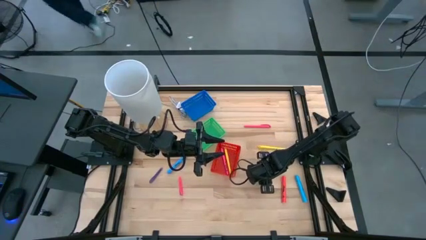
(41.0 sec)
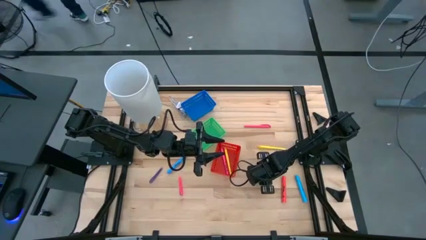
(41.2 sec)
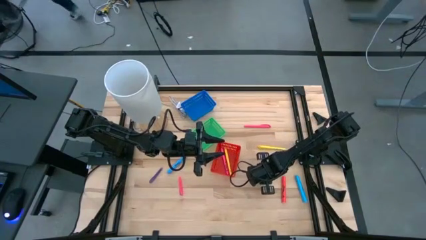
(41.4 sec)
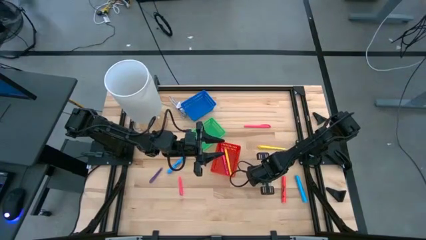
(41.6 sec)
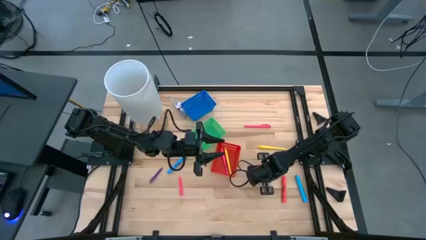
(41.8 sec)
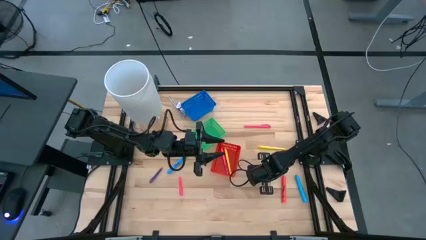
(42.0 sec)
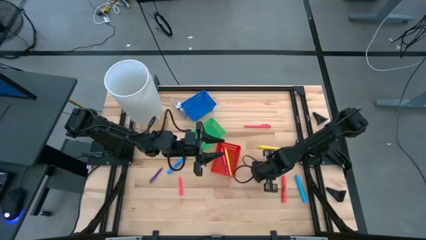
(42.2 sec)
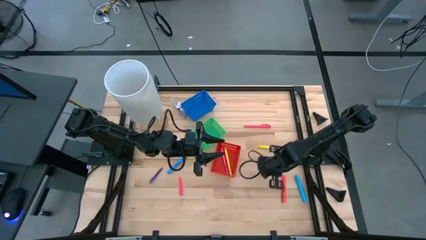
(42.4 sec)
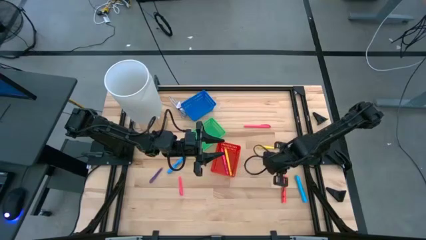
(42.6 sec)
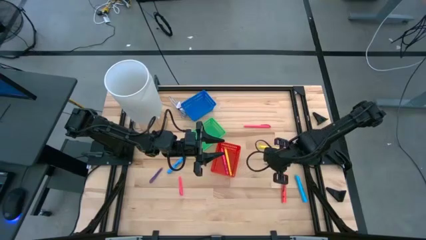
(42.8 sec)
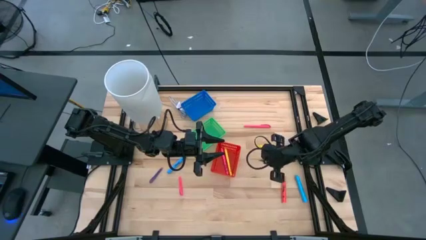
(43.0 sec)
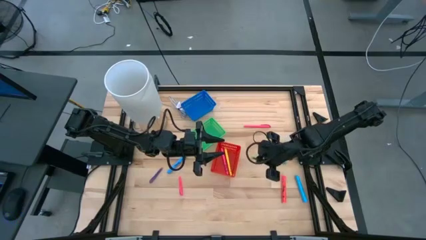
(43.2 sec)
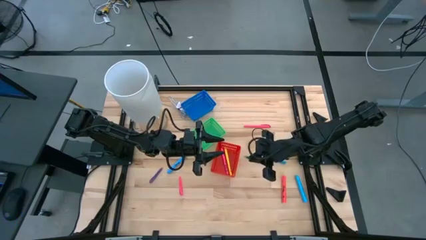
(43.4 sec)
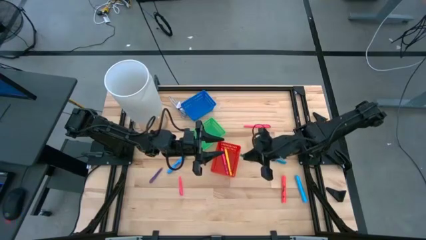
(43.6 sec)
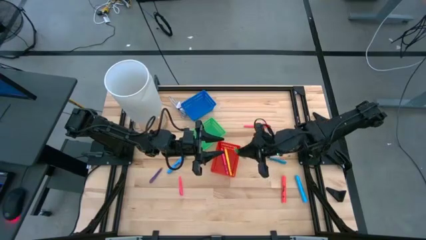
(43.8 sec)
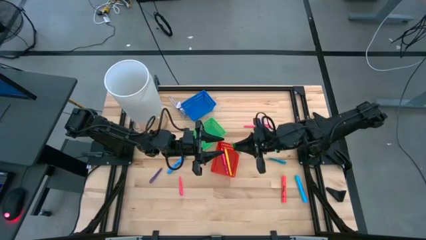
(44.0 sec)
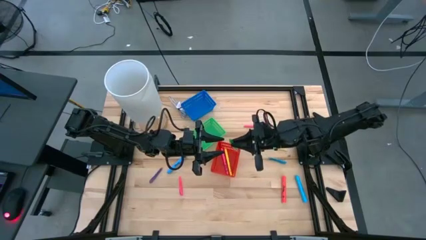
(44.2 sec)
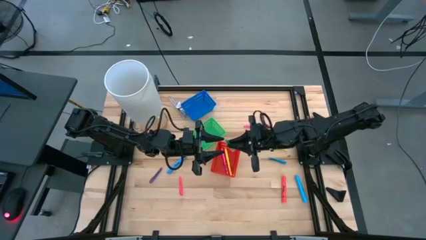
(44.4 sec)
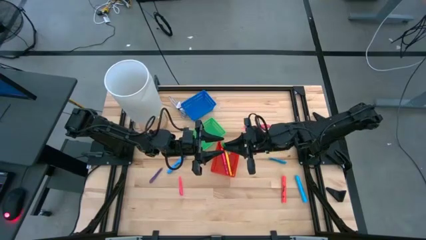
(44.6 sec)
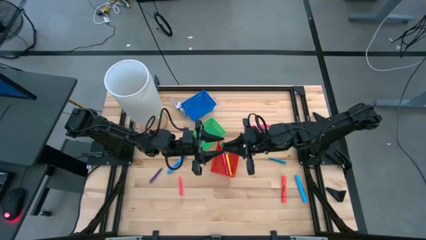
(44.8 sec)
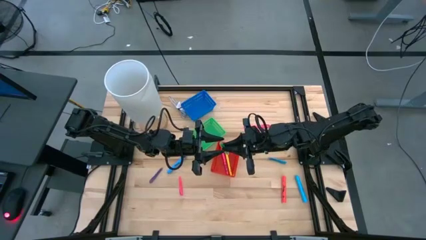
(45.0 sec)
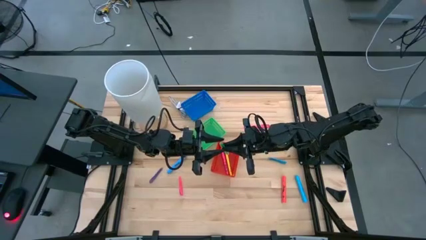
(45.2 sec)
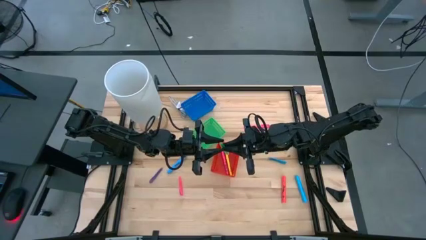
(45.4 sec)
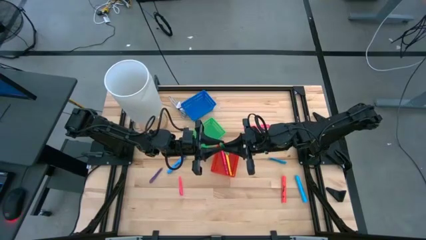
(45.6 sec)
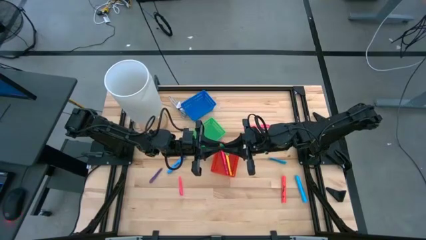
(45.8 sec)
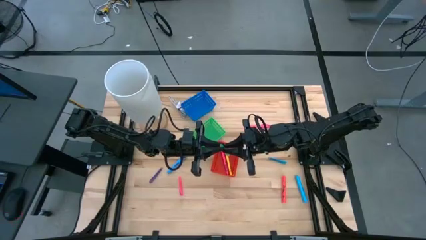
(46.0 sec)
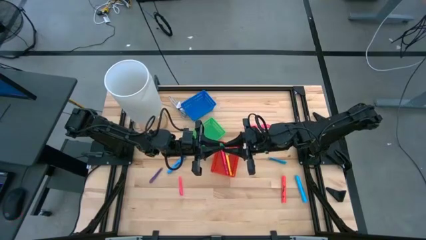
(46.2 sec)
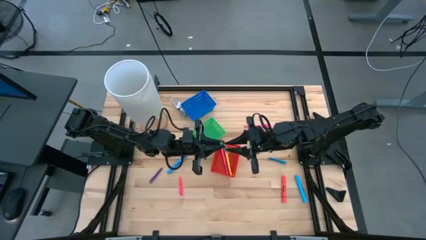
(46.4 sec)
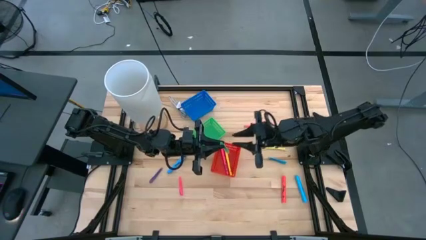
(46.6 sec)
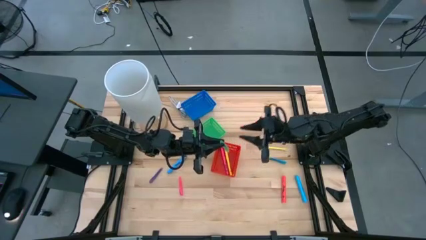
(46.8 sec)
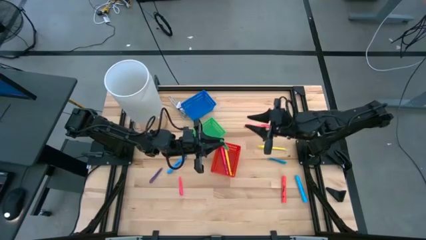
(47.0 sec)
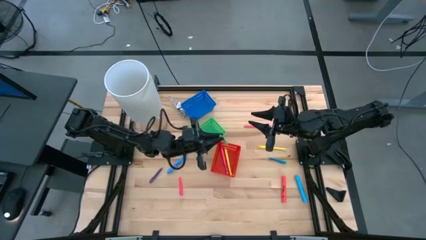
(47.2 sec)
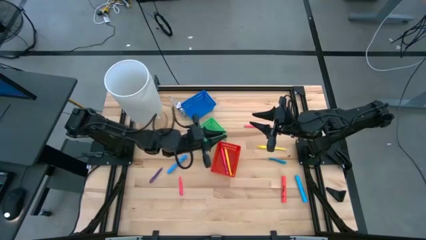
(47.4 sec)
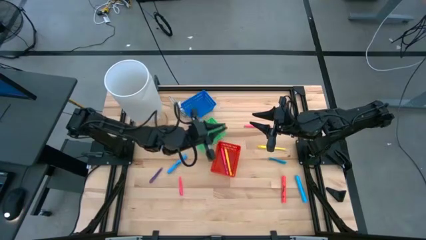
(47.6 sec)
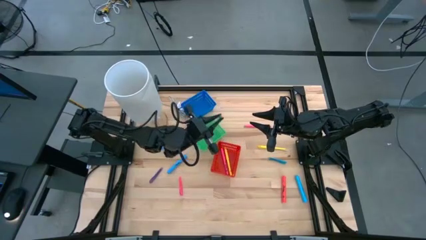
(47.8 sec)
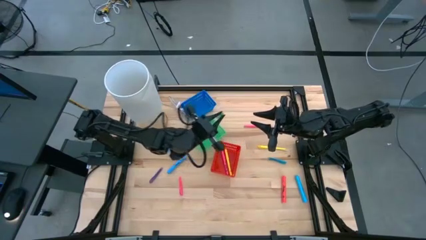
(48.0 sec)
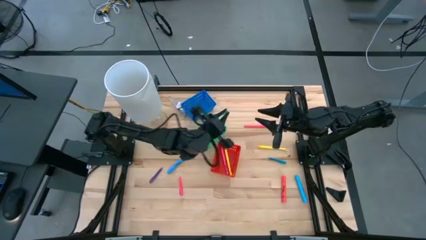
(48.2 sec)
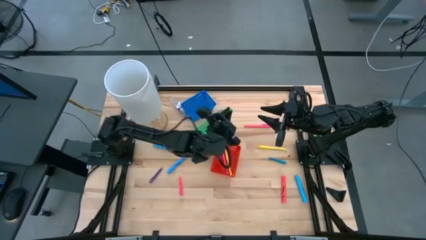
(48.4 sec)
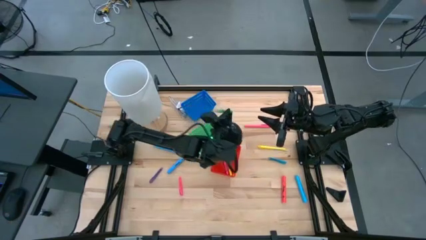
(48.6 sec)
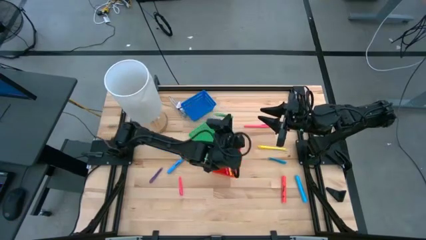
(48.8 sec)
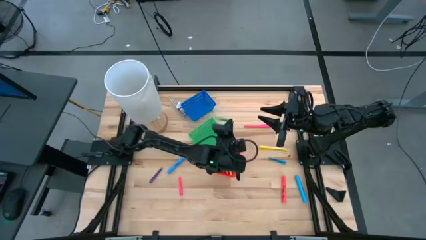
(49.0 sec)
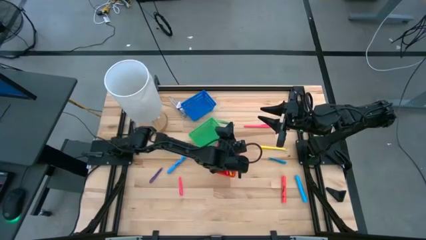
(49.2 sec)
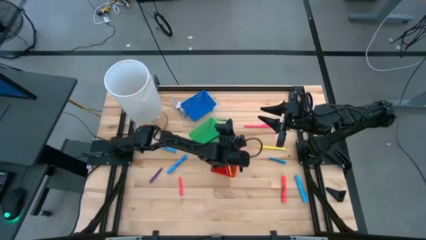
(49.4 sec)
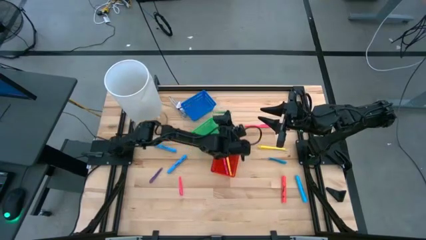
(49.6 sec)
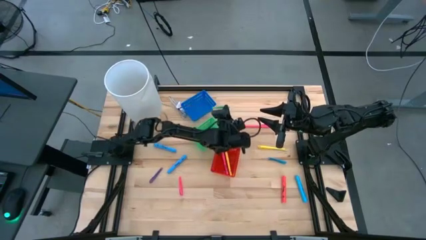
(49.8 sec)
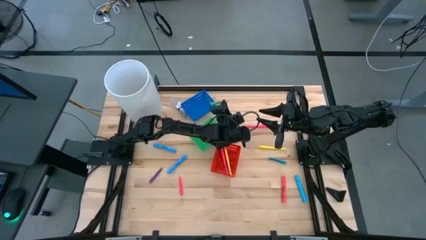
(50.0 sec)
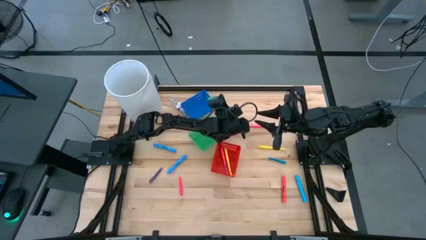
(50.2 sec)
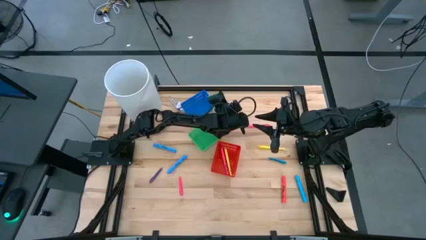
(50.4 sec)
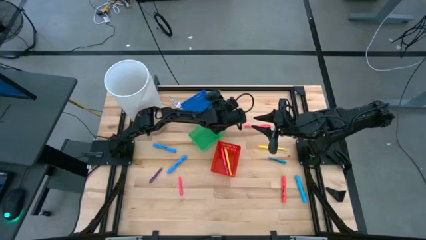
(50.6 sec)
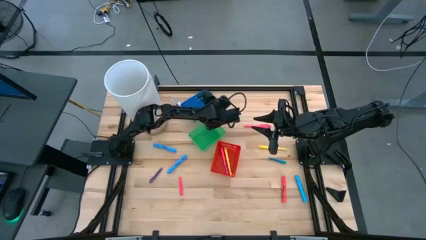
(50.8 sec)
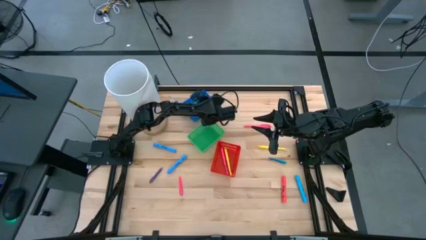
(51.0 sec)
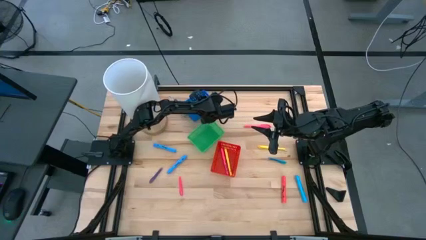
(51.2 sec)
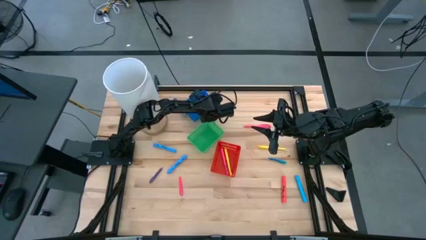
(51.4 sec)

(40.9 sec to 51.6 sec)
Task: Pick & Place Markers
Put the small green pen into the blue bin
